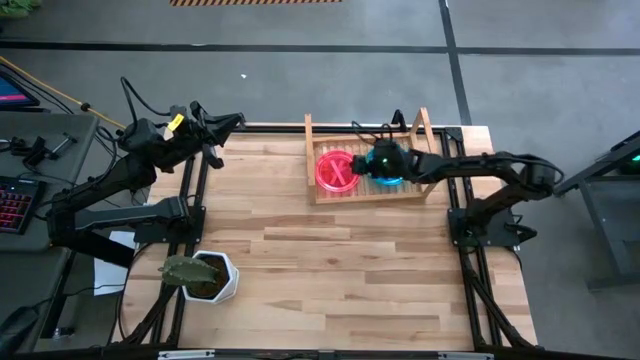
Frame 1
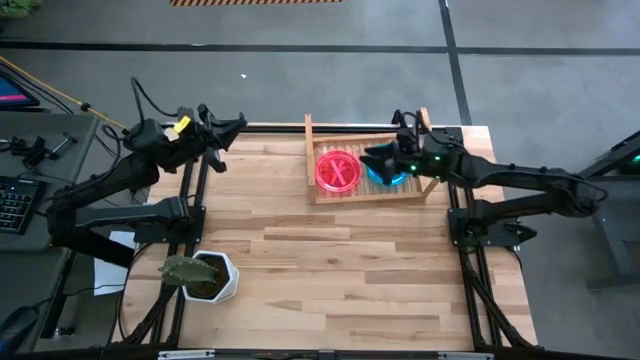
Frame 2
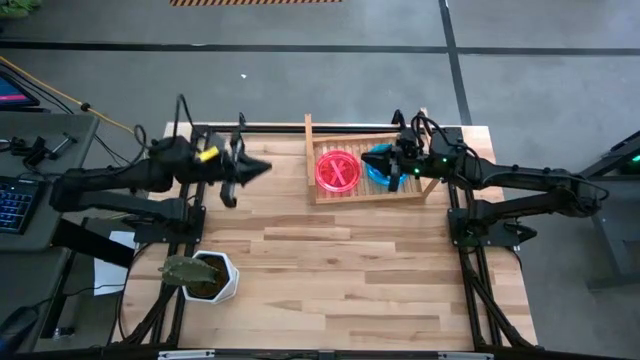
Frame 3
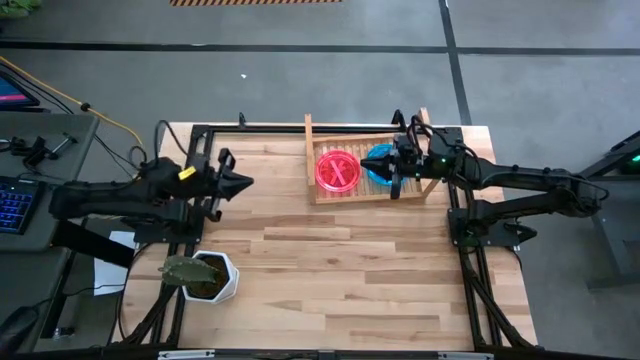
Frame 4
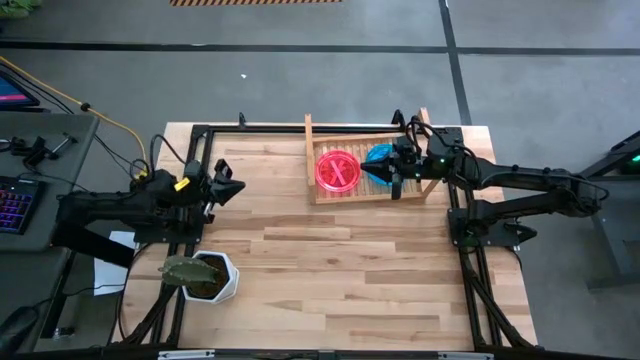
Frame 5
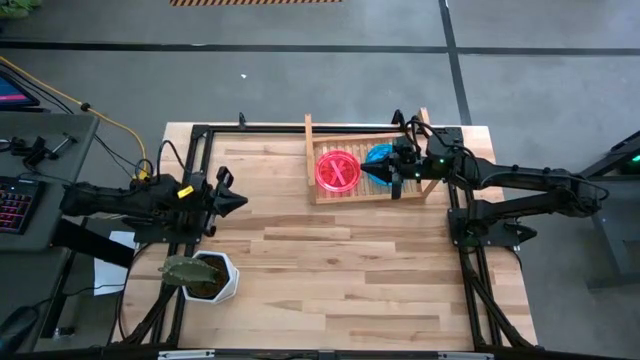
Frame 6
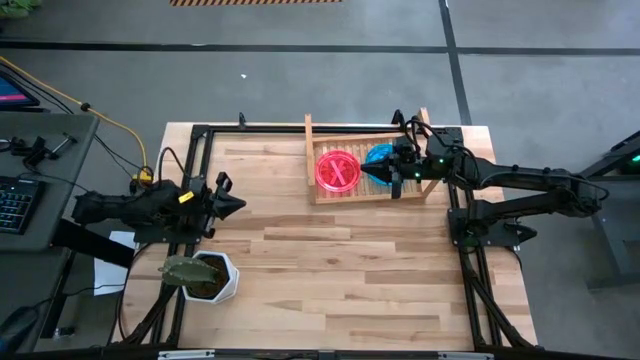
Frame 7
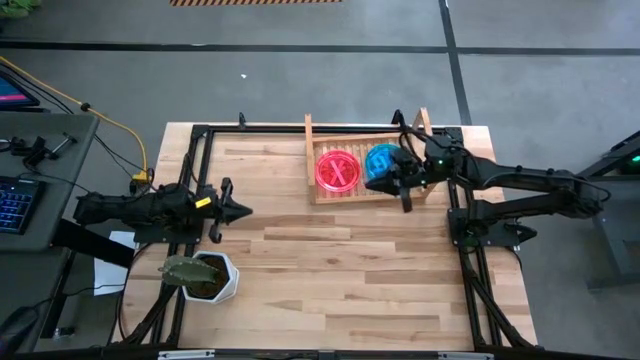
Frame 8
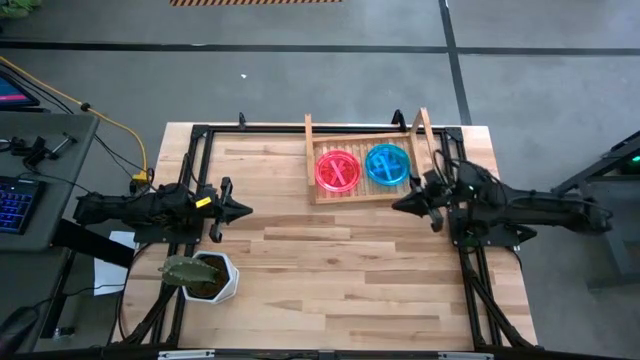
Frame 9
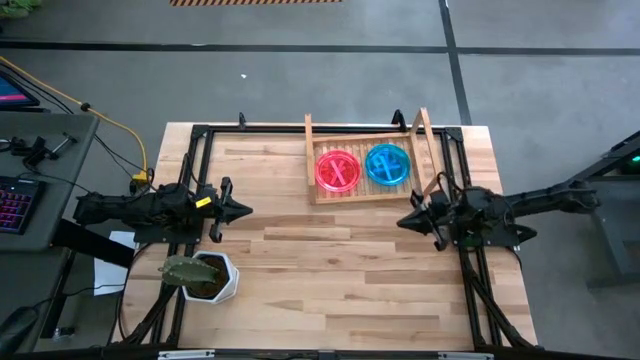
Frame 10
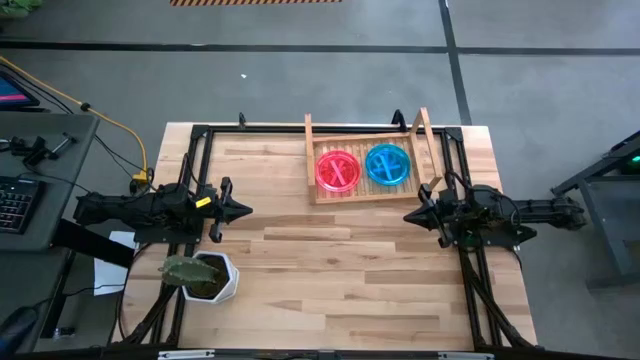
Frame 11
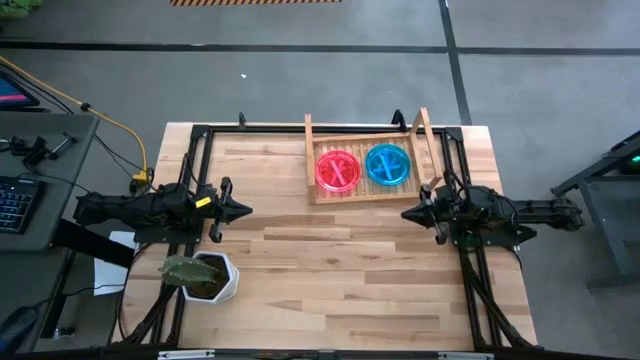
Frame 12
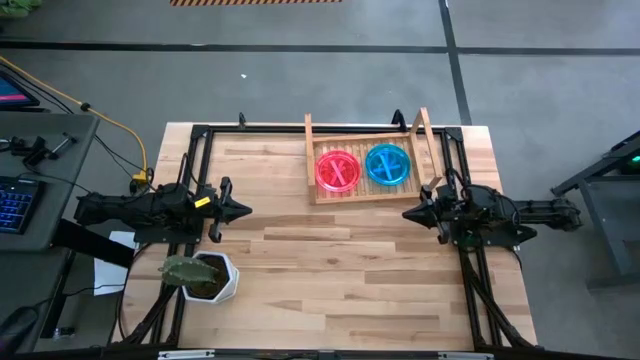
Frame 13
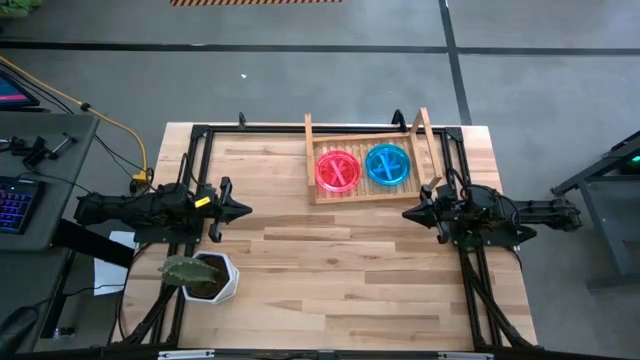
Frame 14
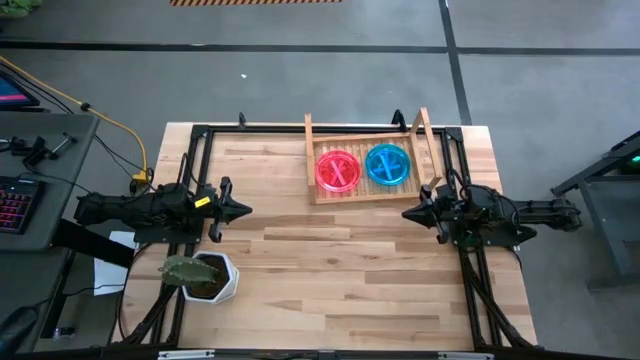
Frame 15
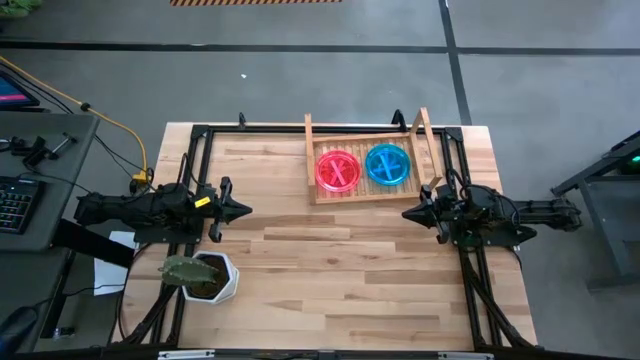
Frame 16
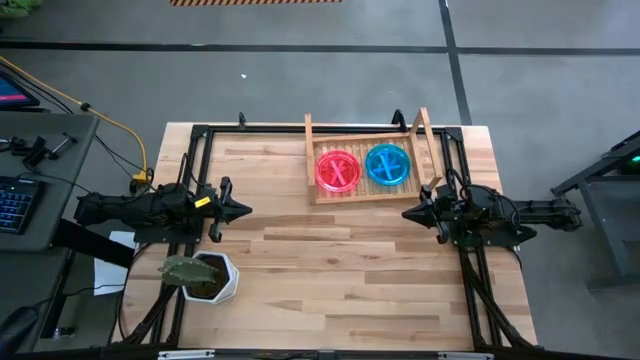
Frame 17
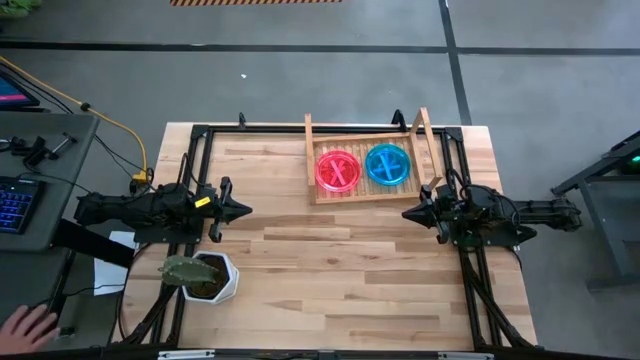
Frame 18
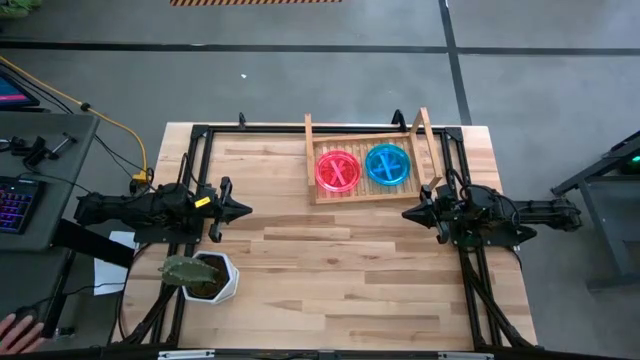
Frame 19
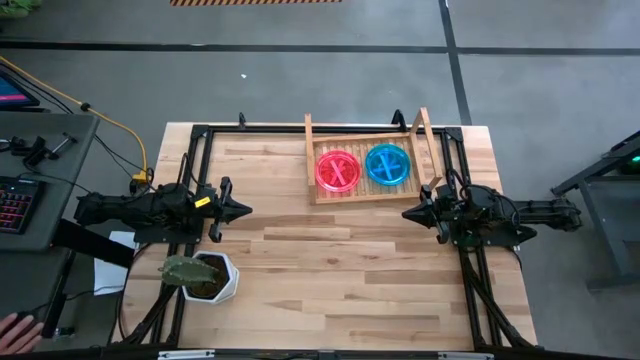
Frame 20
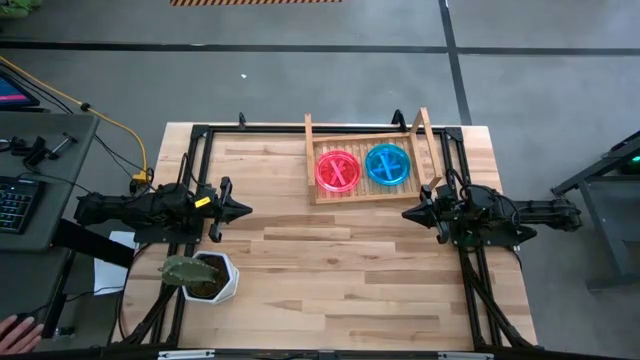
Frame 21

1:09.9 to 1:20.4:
Task: Place and stack plates onto a shelf
Return to Home Position

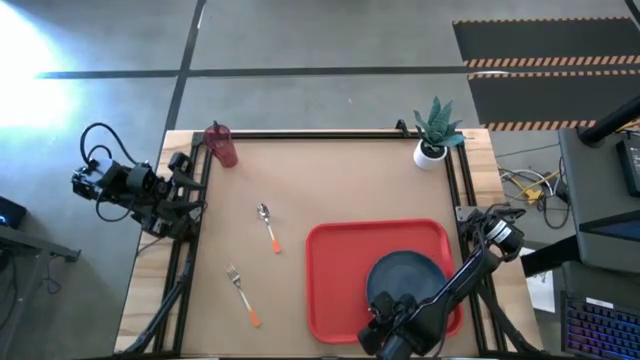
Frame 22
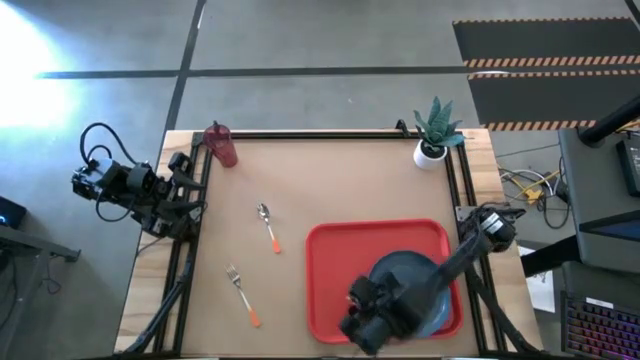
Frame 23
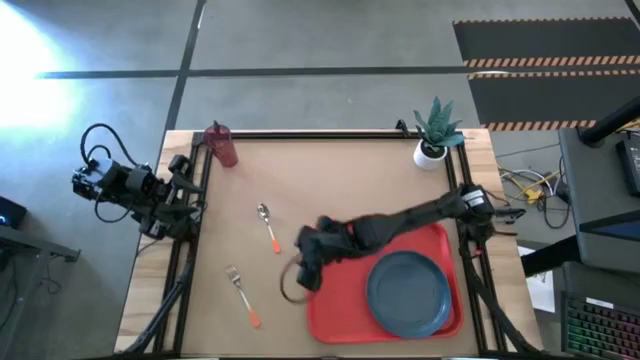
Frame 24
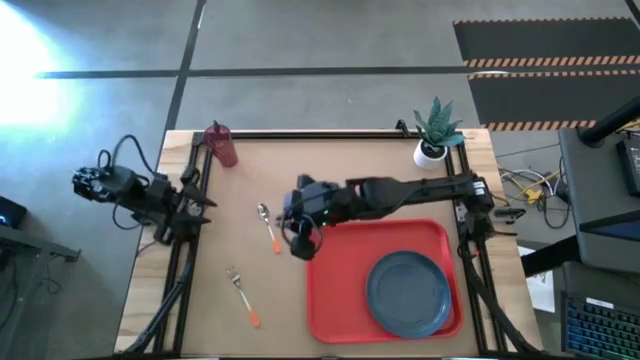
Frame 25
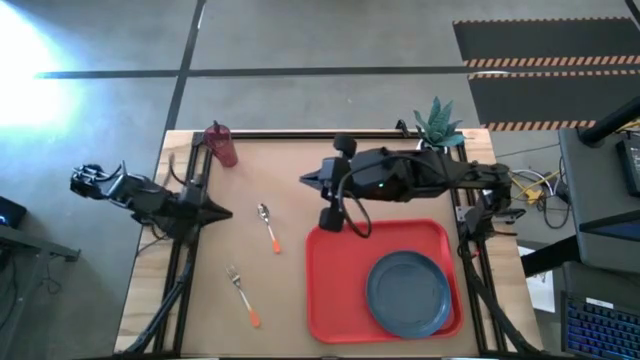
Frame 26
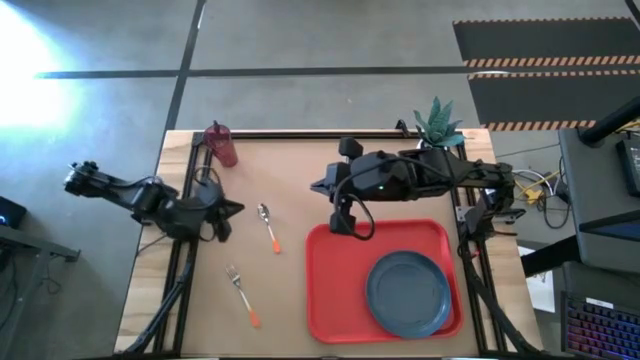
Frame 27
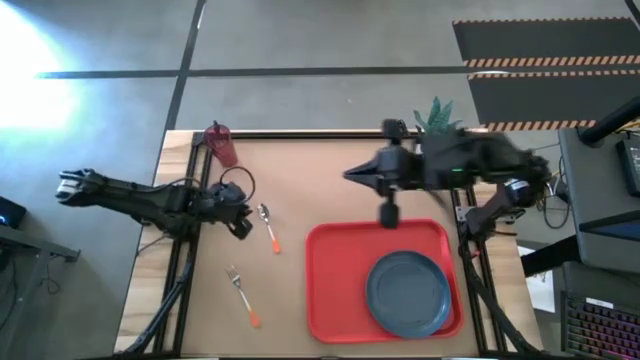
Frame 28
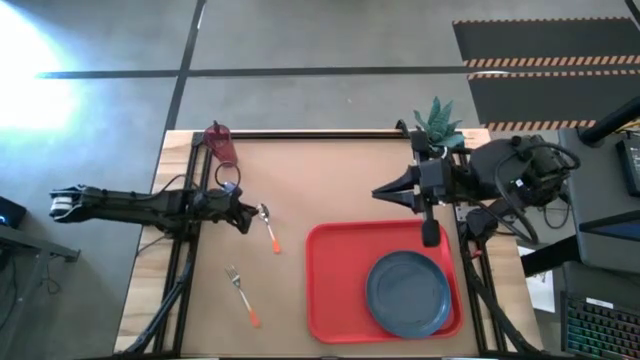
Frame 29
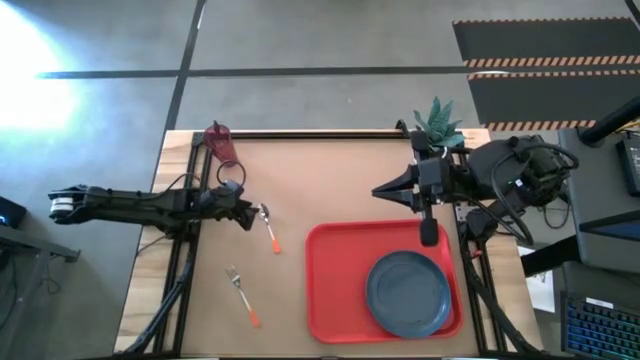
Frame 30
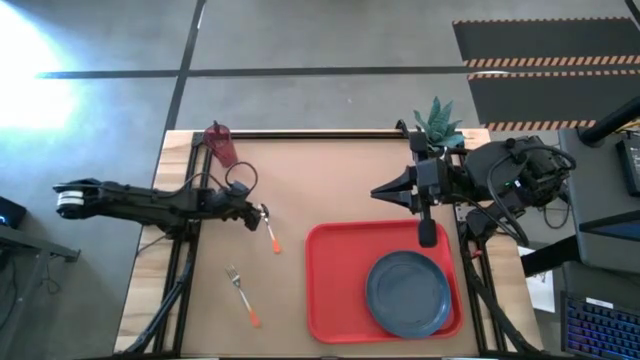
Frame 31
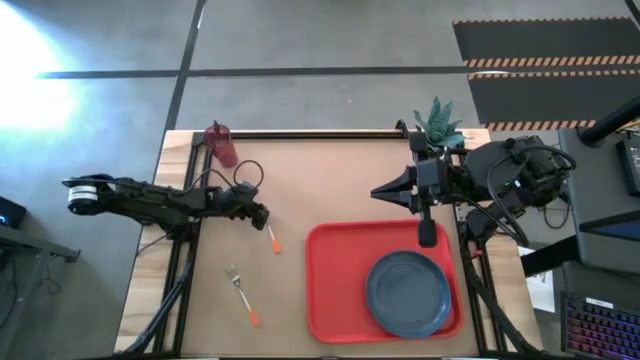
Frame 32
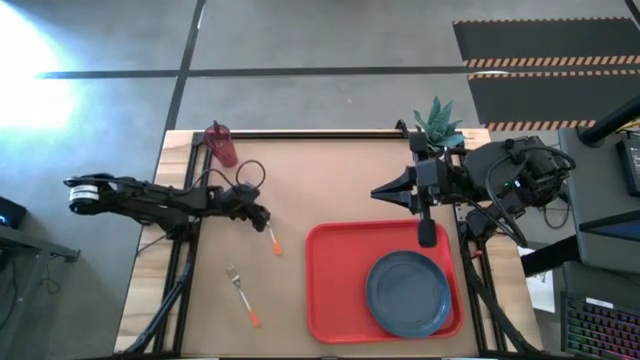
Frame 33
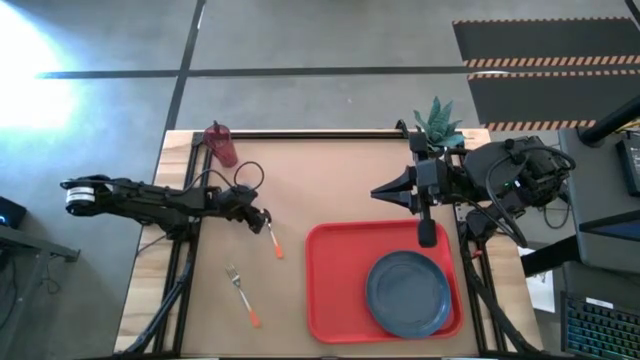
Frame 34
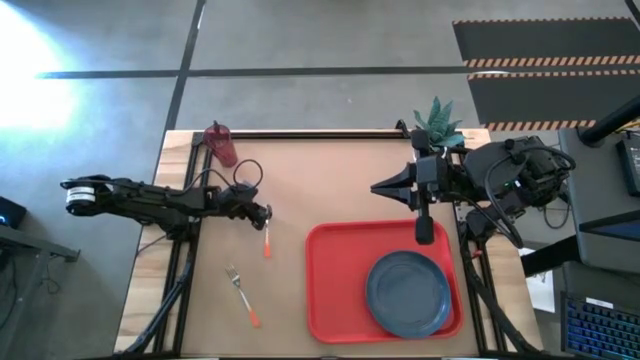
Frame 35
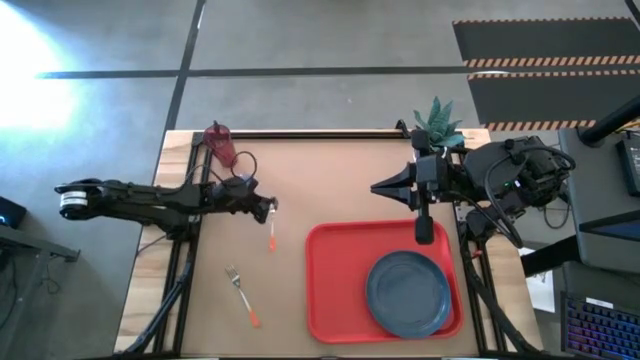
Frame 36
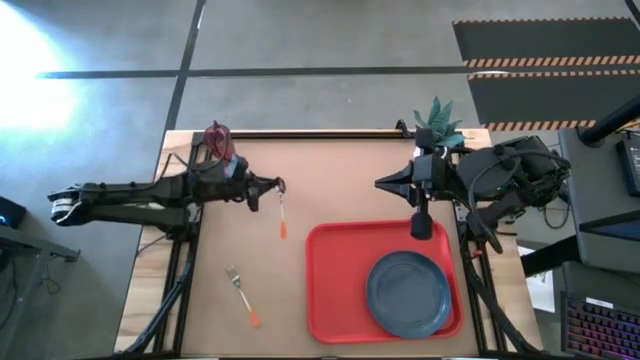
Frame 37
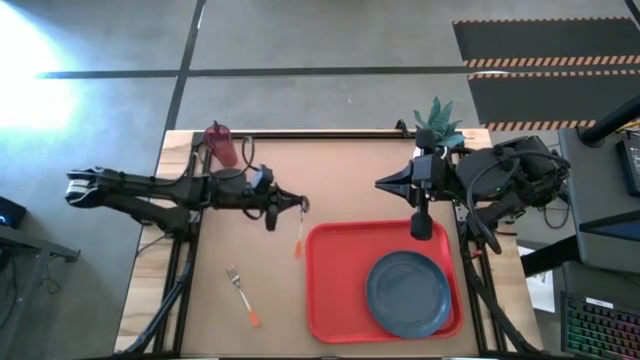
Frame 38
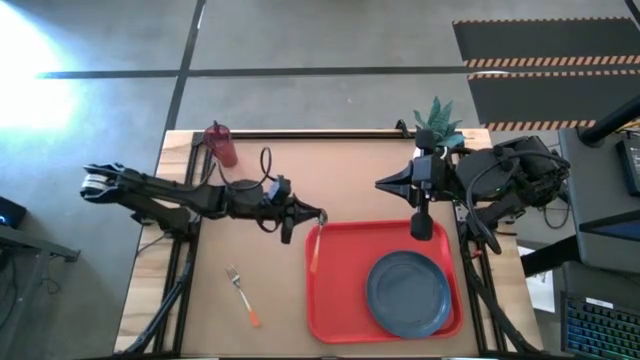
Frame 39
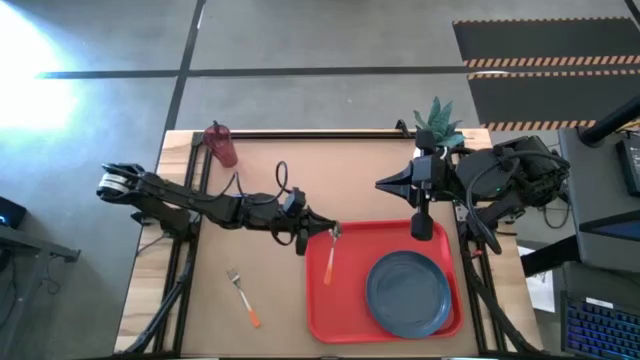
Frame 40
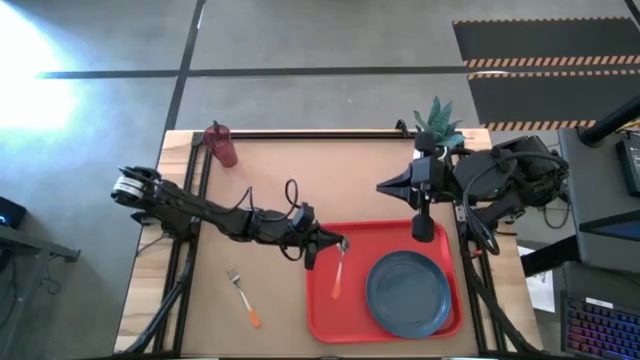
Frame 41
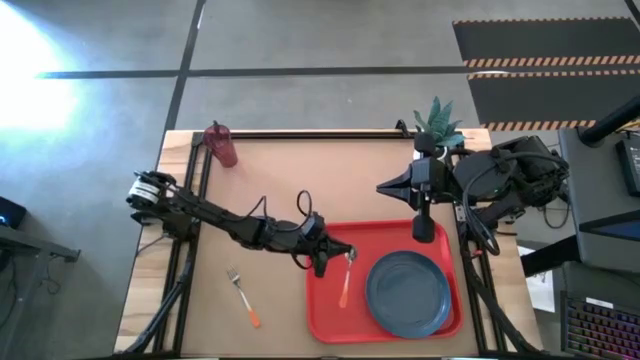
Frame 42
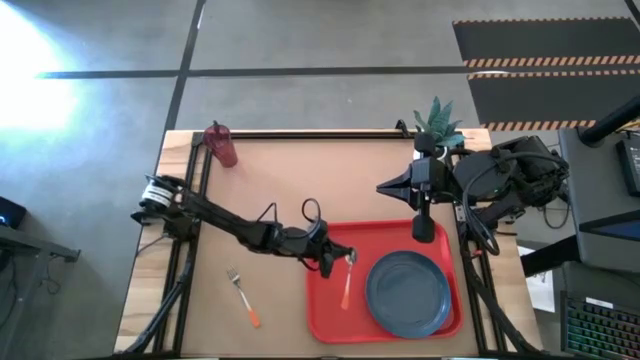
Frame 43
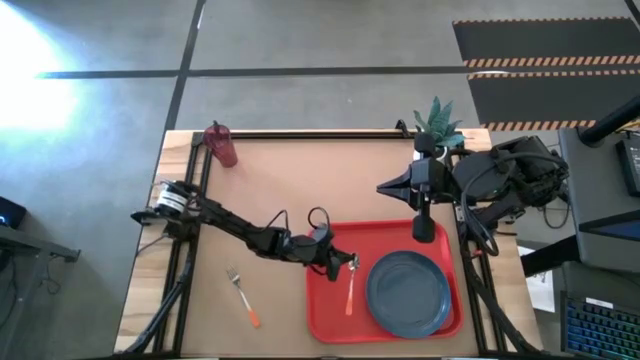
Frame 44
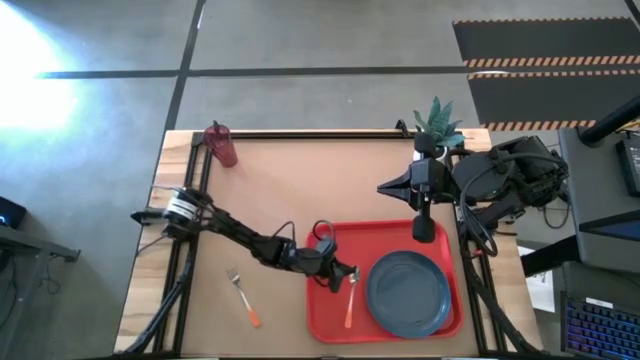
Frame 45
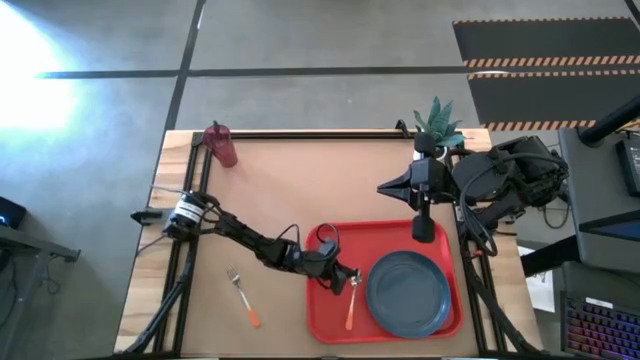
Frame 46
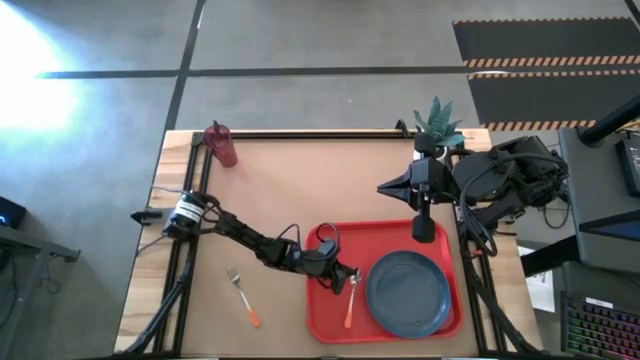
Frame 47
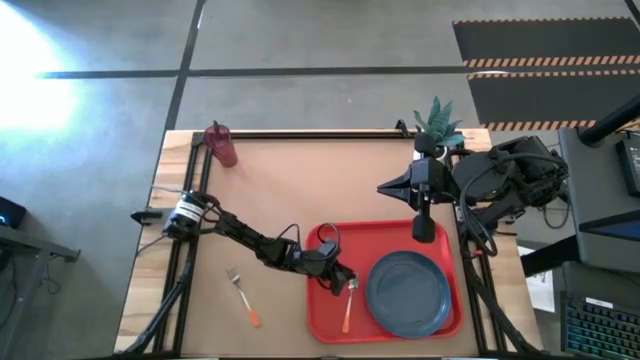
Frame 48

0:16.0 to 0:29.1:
Task: Pick and place plate/cup/fork/spoon on tray
Put the orange spoon on the orange serving tray to the left of the blue plate
